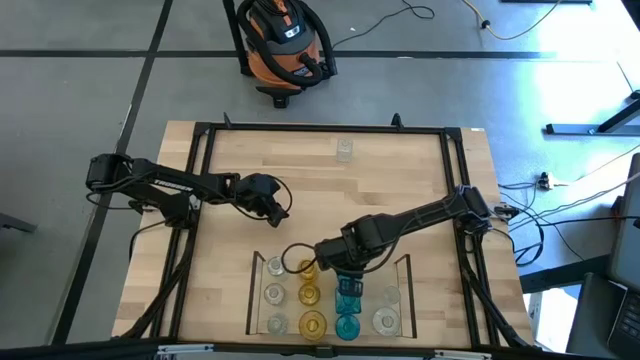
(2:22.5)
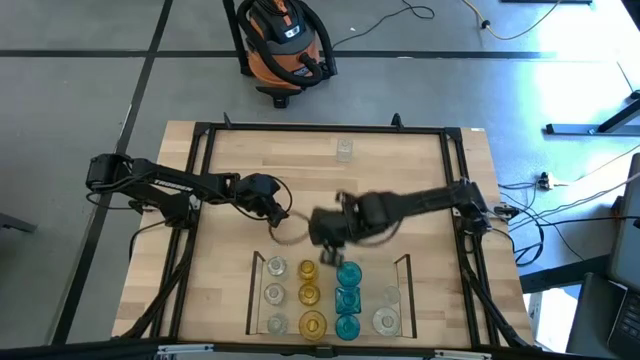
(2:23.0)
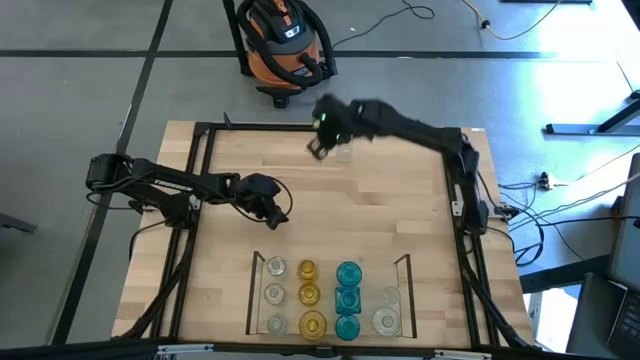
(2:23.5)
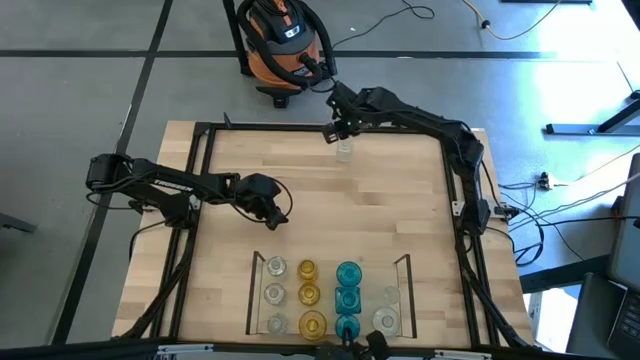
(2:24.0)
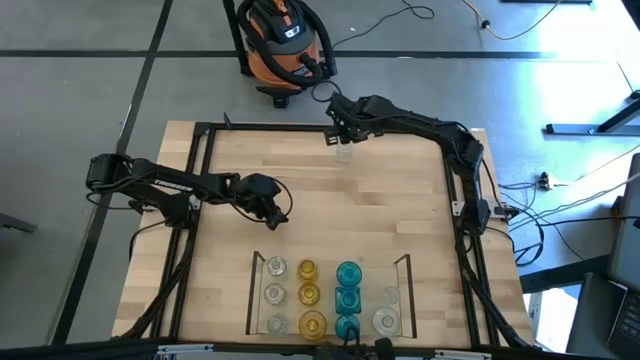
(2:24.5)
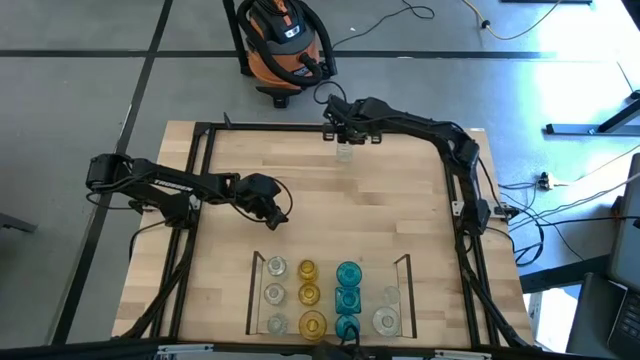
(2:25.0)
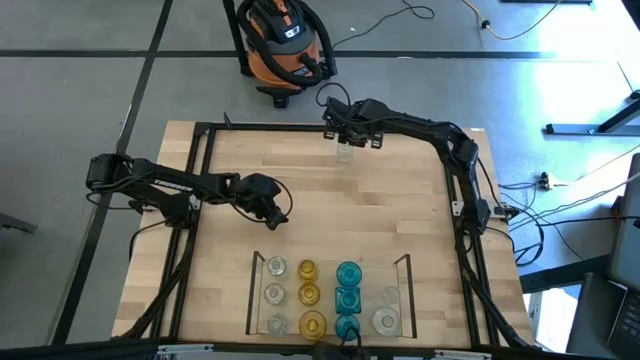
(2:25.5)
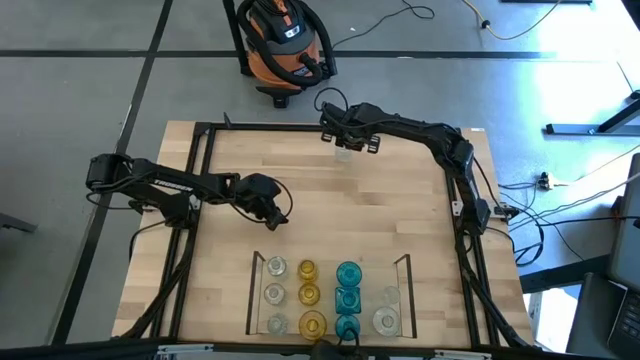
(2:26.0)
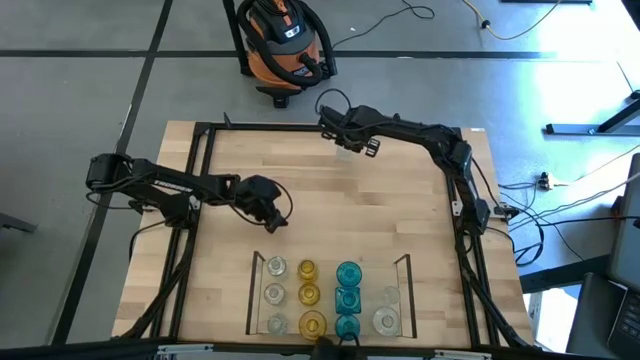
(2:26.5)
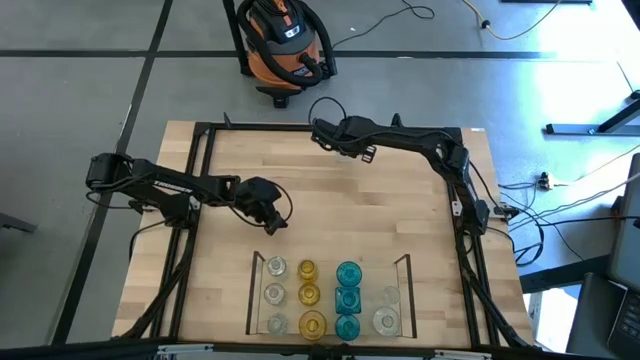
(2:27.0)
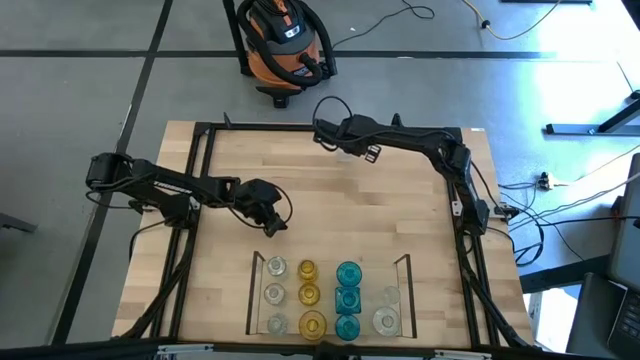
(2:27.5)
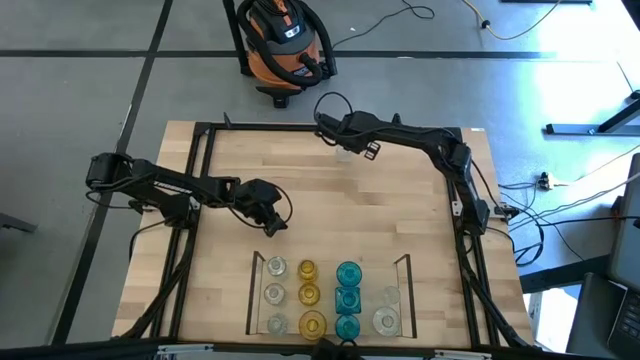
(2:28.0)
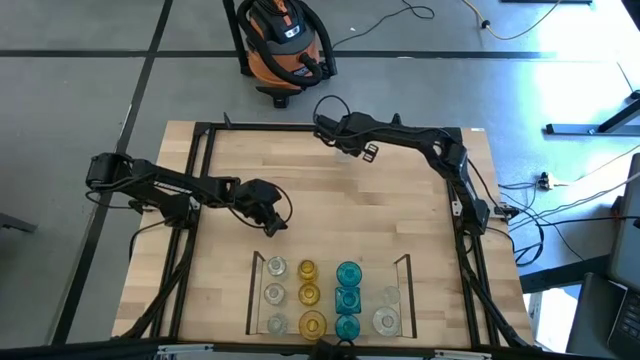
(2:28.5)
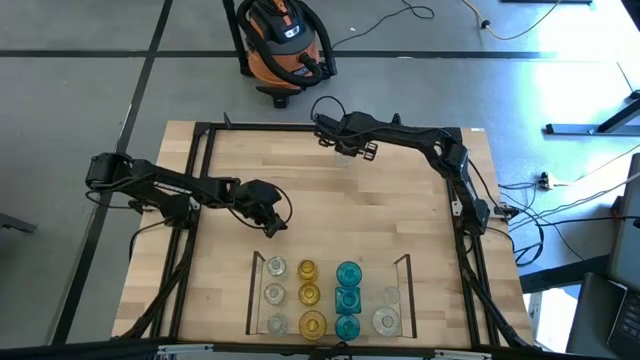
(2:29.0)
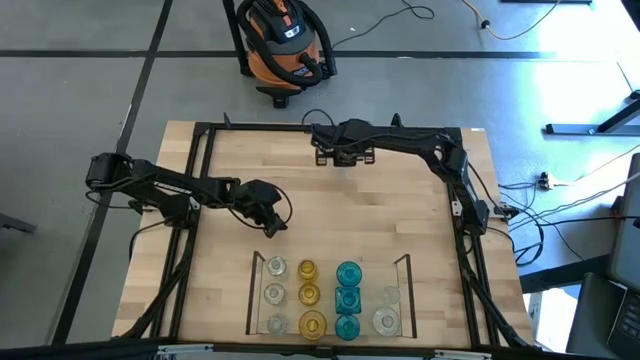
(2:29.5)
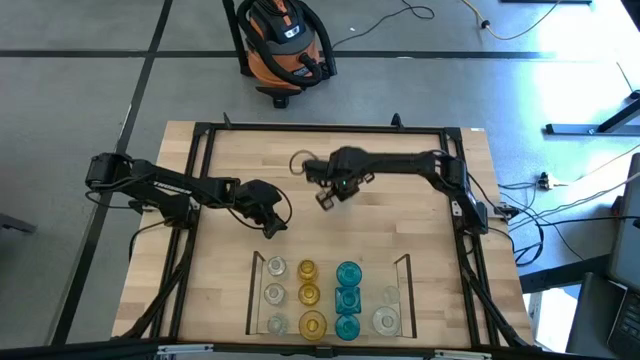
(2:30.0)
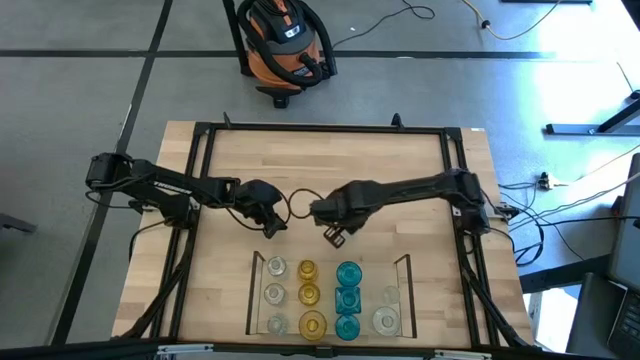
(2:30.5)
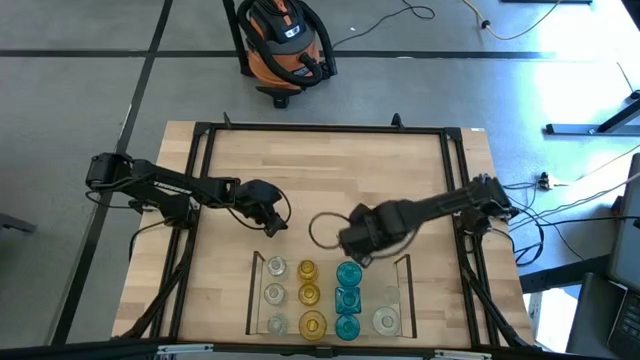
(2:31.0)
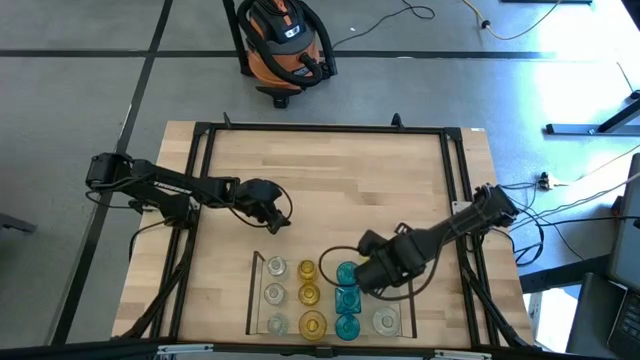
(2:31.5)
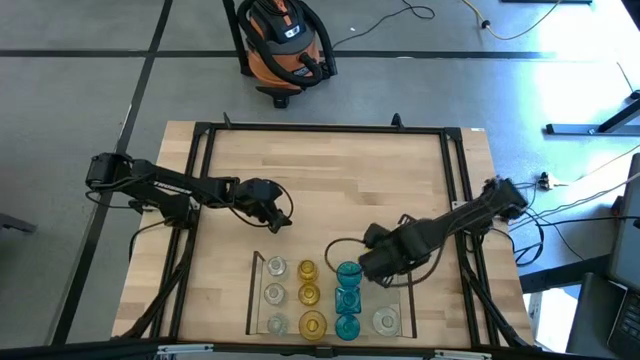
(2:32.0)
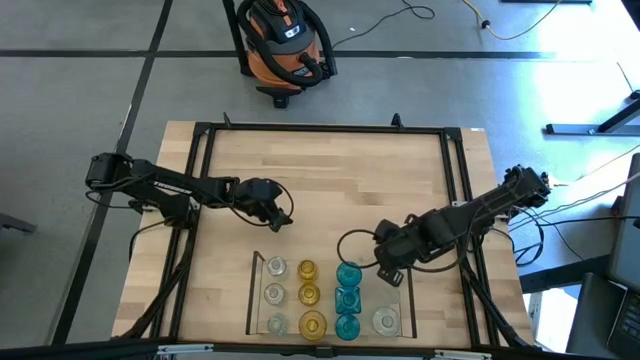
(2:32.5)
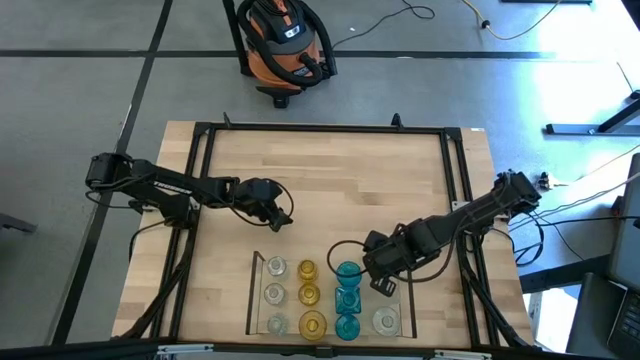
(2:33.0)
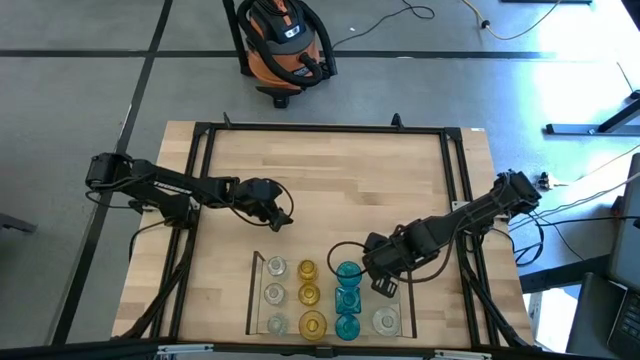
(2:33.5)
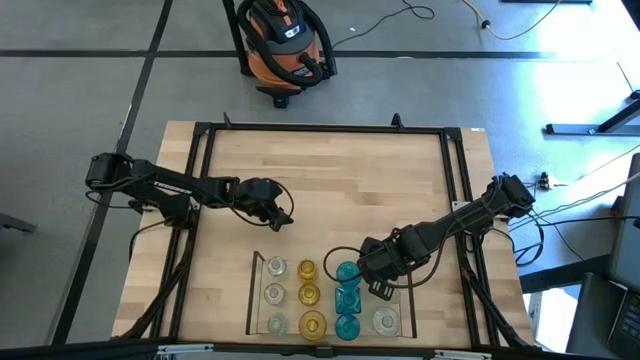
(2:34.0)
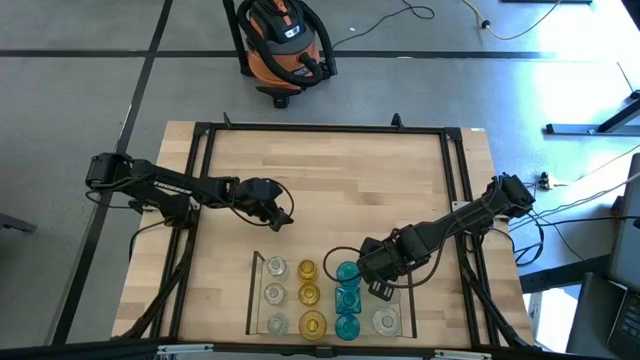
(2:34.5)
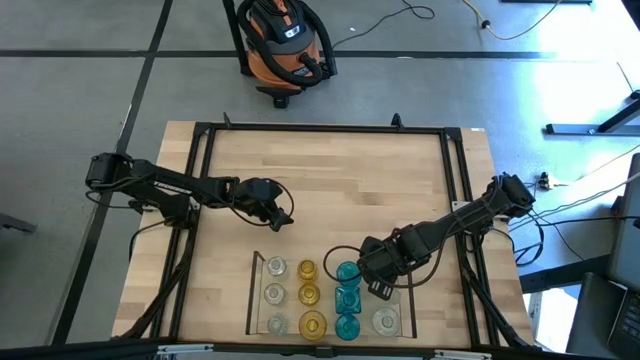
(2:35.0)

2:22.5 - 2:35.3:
Task: sort vases onto shelf
Put the transparent vase on the shelf aligned with the other transparent vase

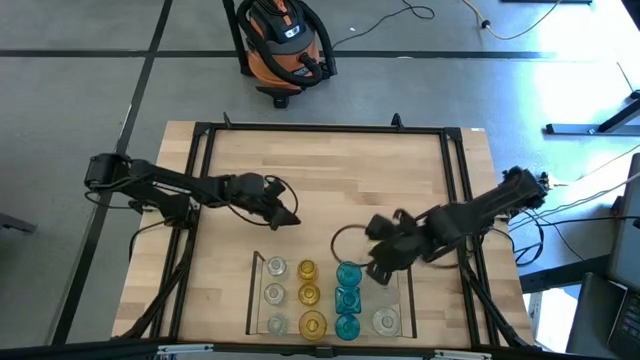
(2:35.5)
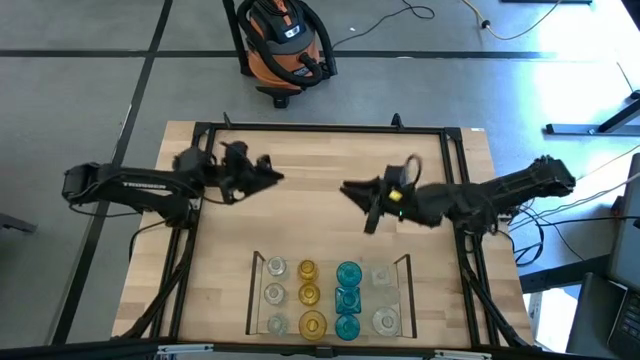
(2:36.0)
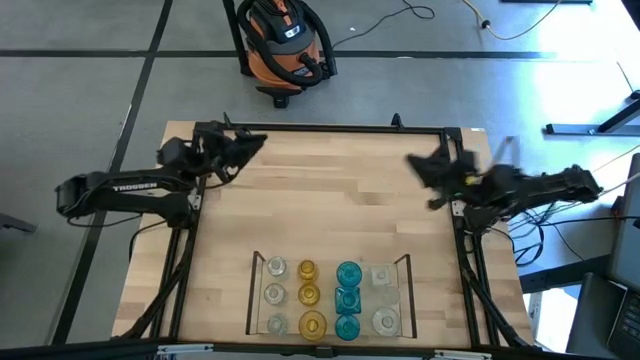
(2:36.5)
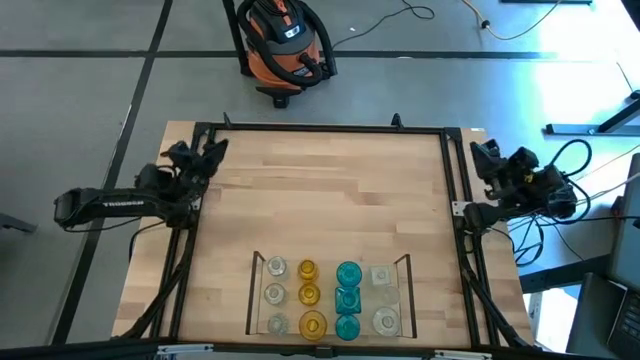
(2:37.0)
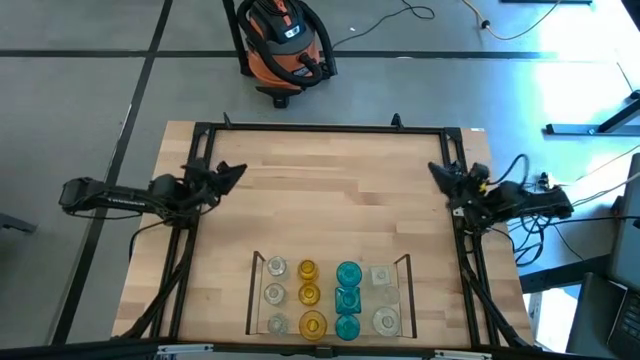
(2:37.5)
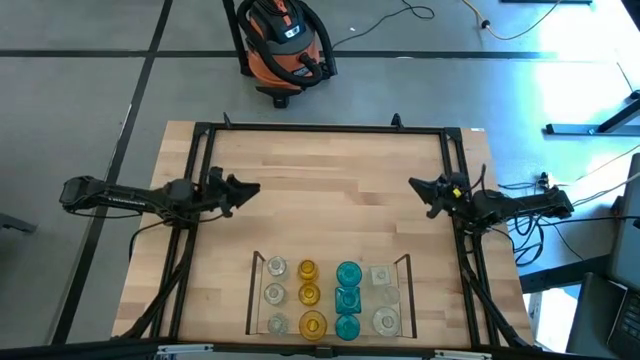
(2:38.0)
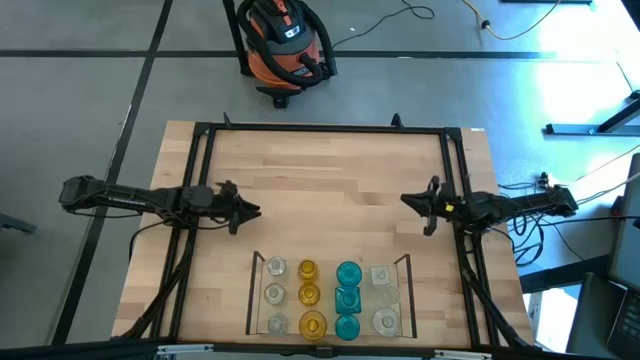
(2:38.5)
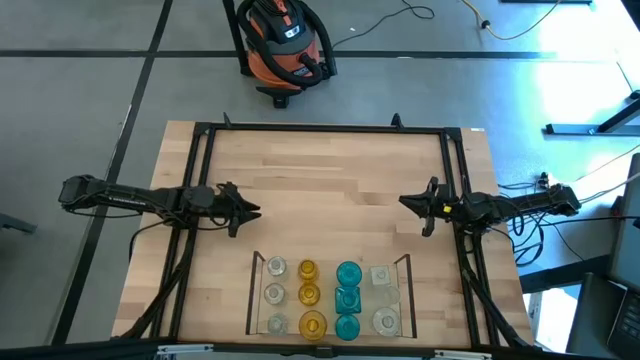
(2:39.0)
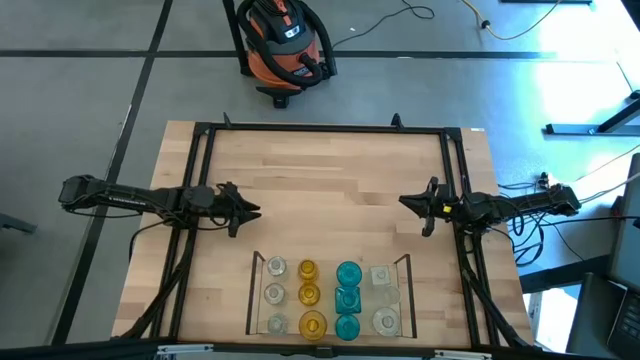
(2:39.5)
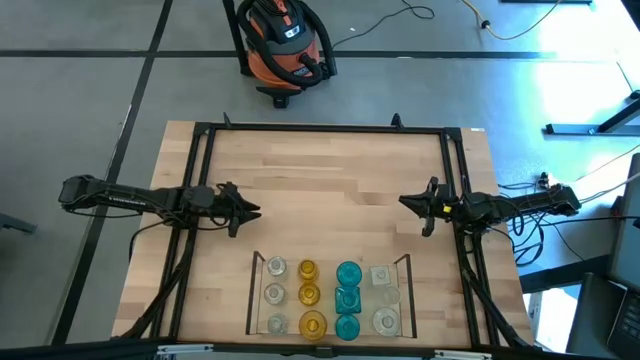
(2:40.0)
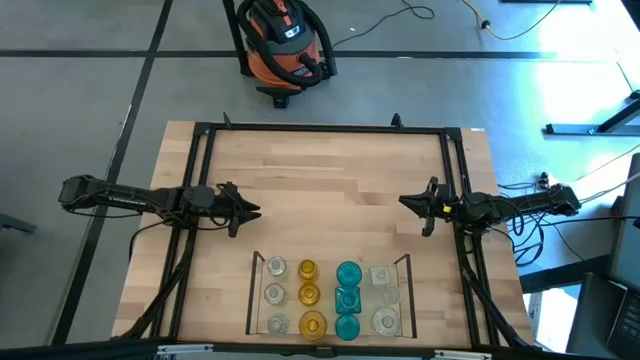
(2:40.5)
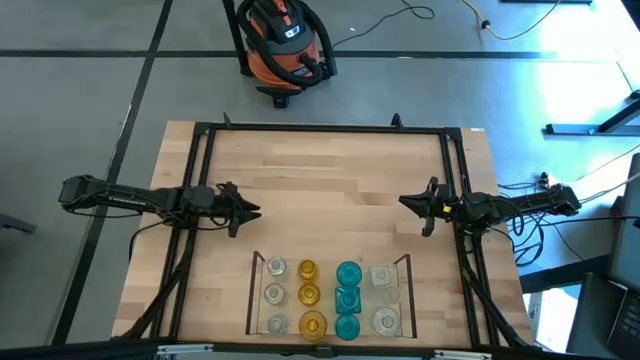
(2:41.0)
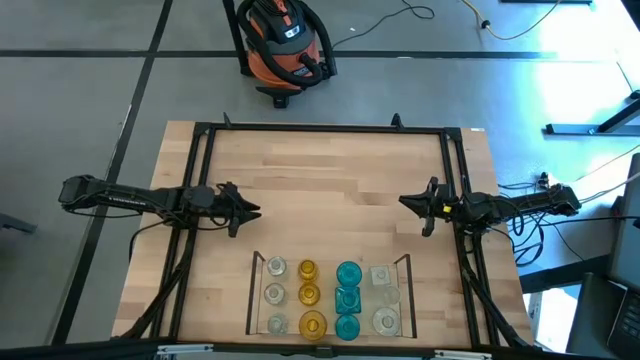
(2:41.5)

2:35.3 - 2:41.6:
Return to Home Position

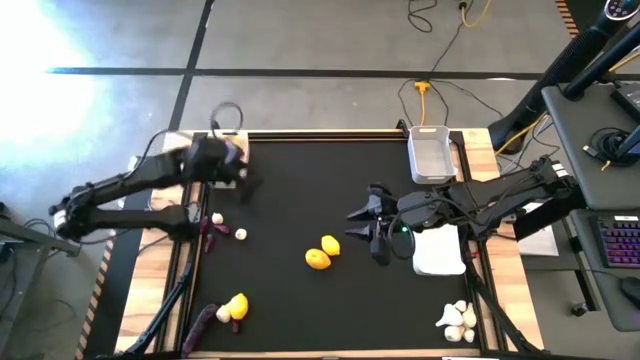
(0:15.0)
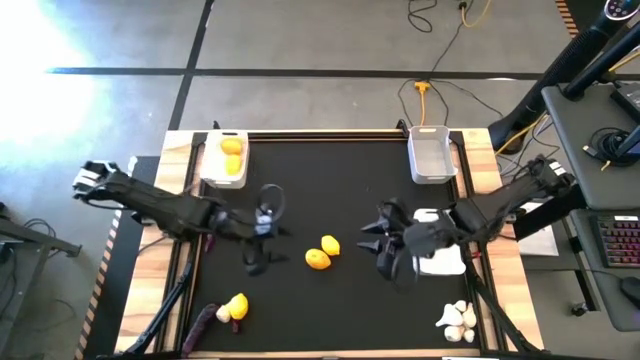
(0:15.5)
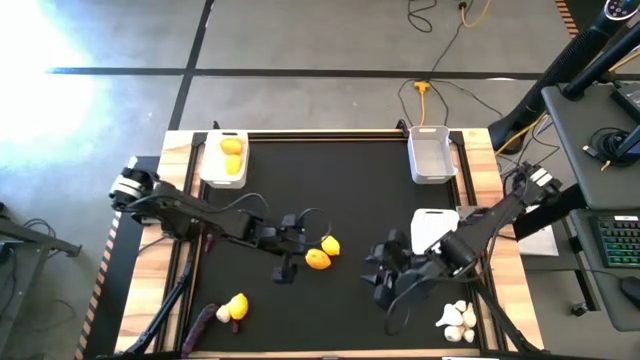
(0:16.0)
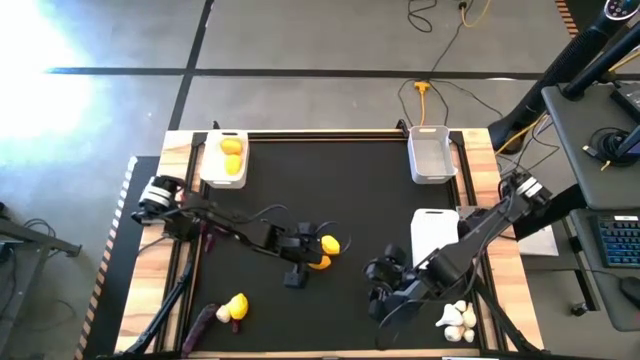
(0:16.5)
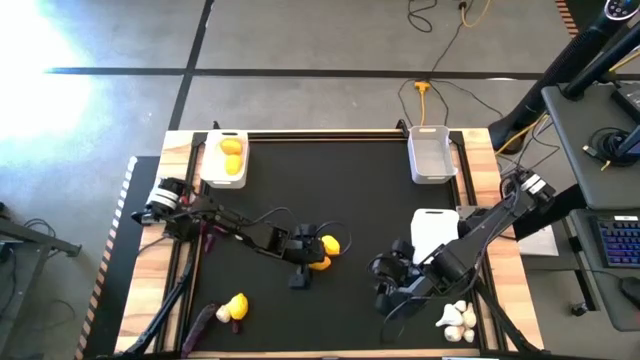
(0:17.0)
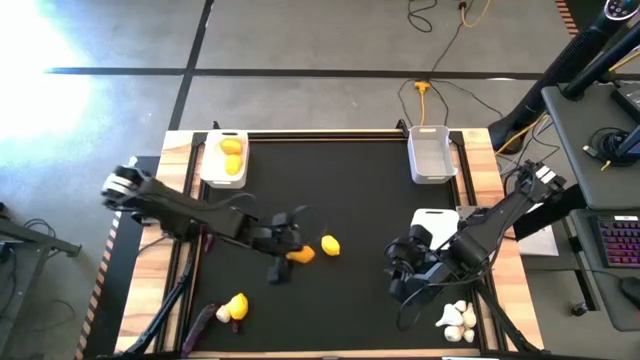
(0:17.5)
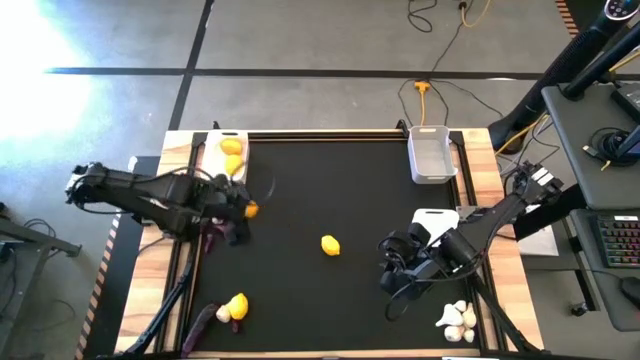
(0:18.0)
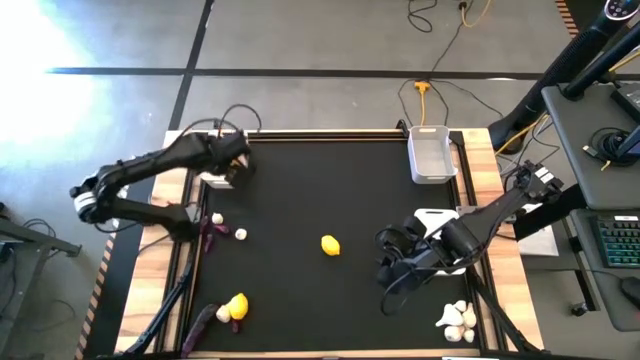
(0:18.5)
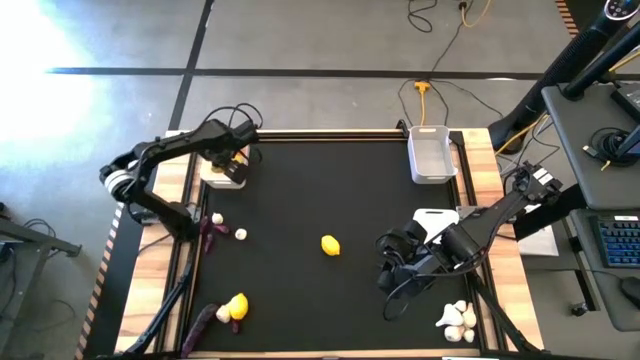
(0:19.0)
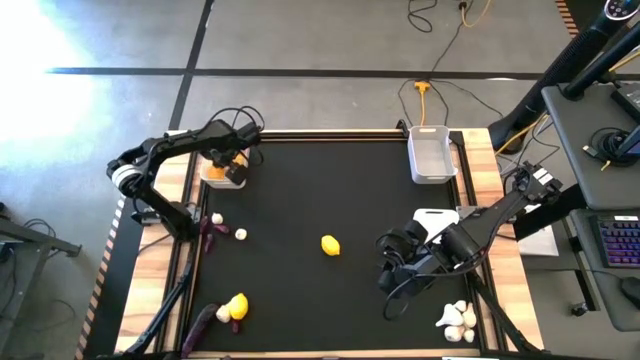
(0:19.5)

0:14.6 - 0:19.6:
Task: Sort produce into baskets
Put the middle right yellow lemon into the left white bin
